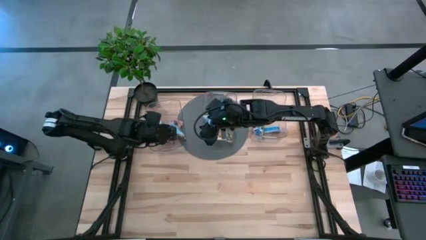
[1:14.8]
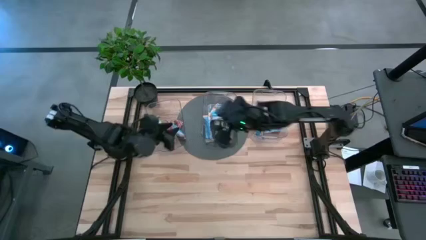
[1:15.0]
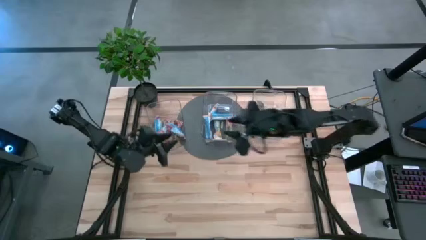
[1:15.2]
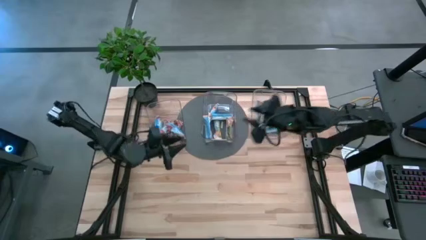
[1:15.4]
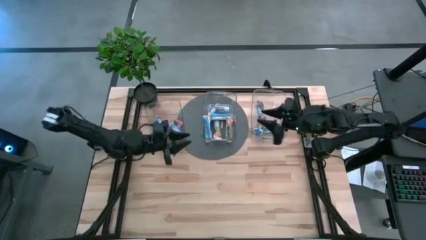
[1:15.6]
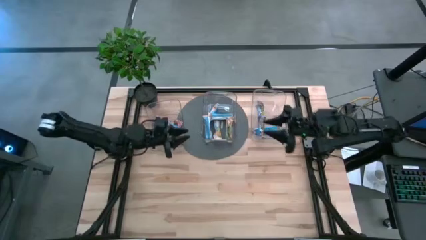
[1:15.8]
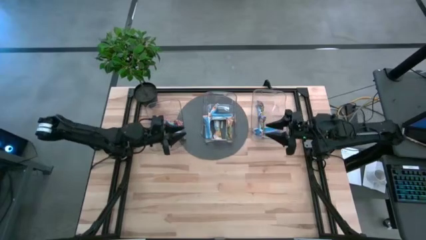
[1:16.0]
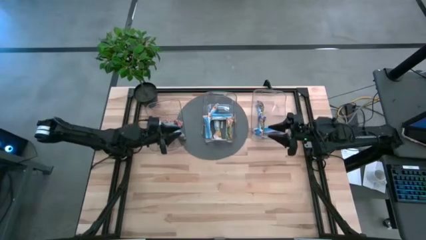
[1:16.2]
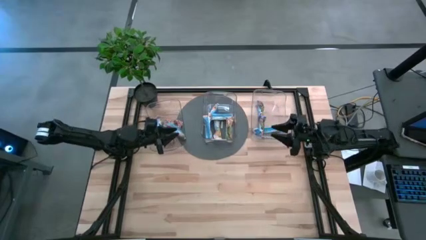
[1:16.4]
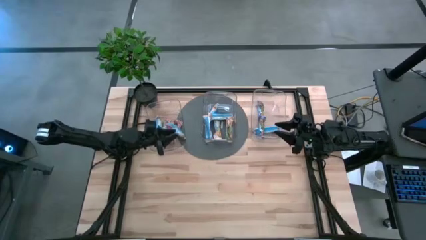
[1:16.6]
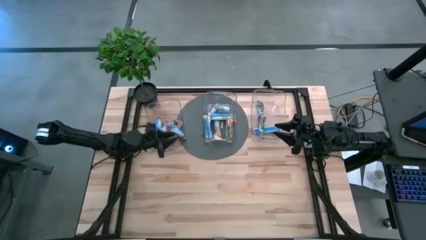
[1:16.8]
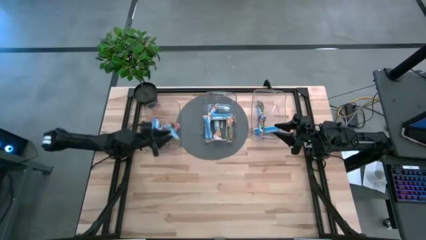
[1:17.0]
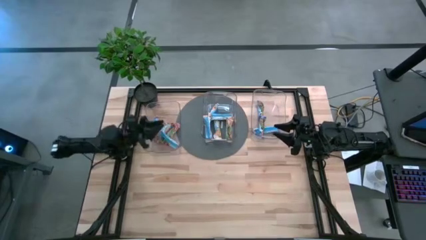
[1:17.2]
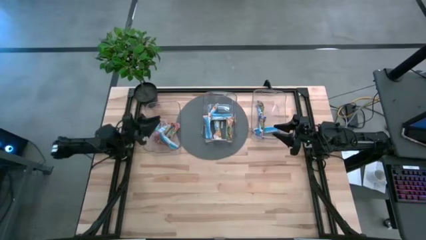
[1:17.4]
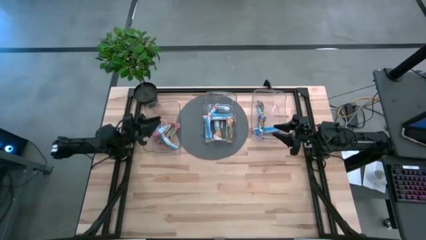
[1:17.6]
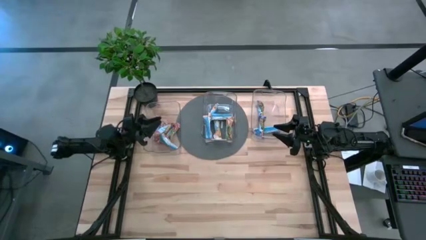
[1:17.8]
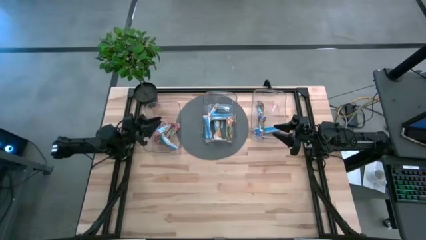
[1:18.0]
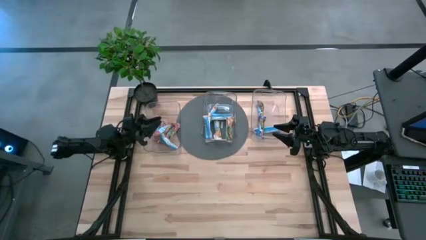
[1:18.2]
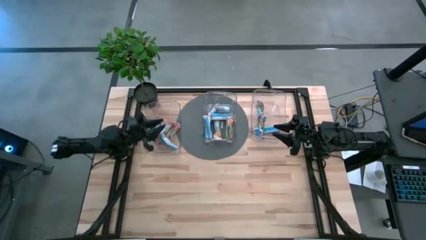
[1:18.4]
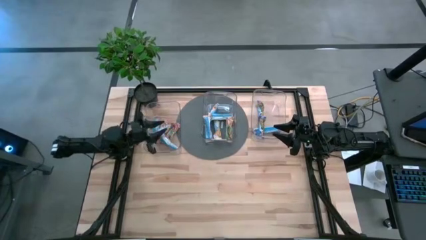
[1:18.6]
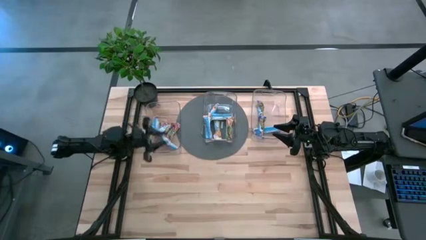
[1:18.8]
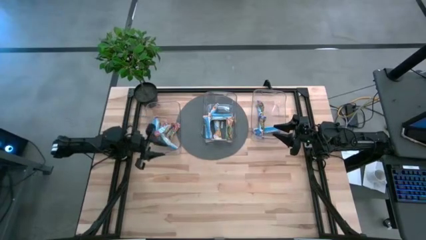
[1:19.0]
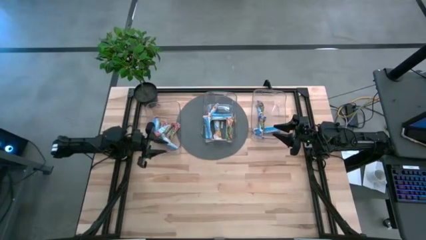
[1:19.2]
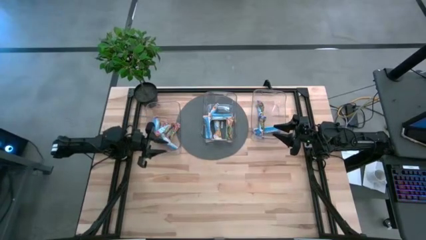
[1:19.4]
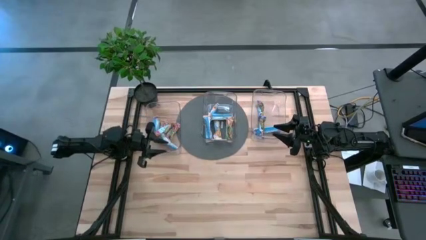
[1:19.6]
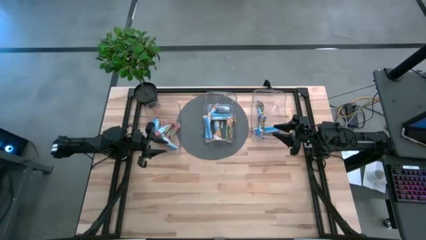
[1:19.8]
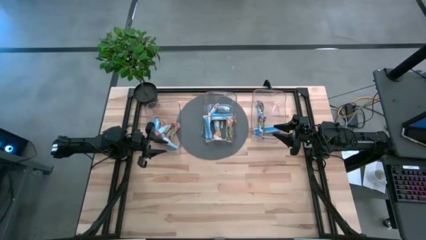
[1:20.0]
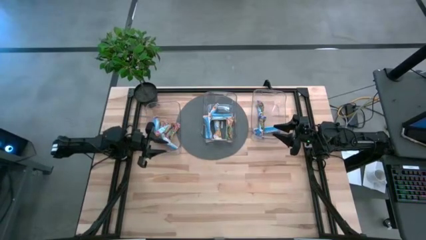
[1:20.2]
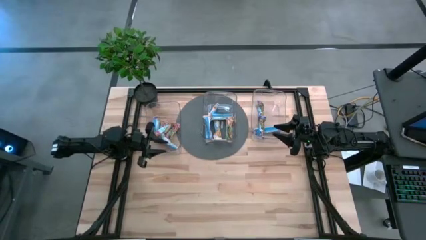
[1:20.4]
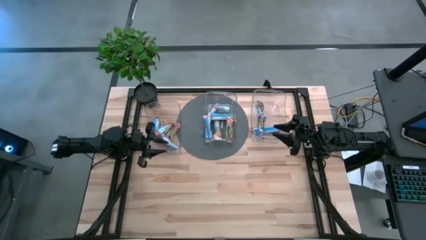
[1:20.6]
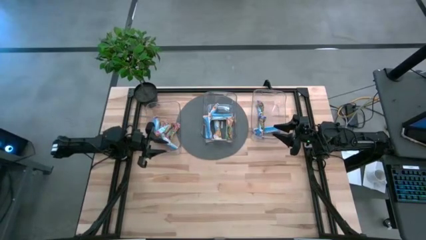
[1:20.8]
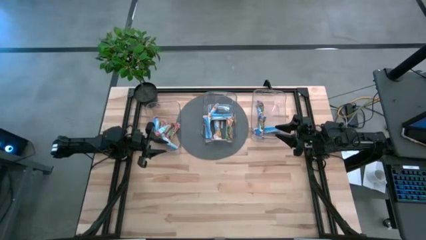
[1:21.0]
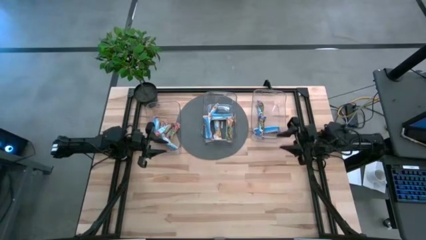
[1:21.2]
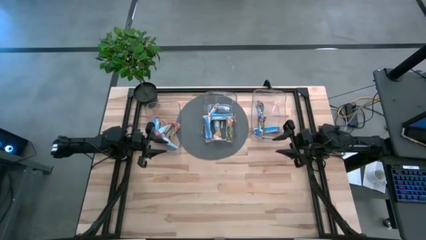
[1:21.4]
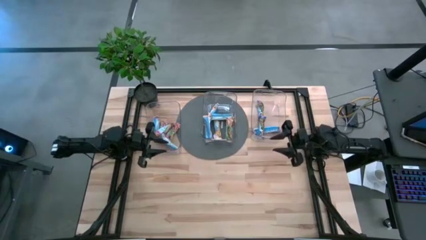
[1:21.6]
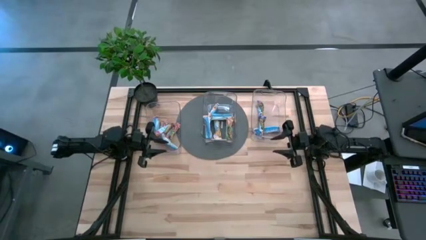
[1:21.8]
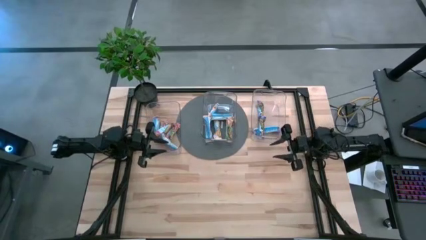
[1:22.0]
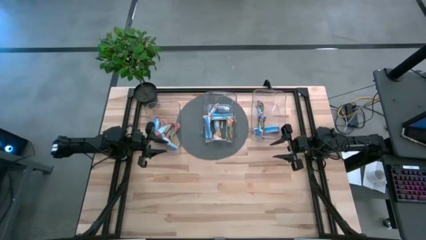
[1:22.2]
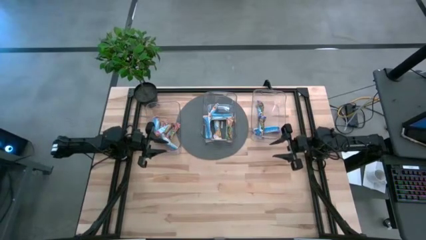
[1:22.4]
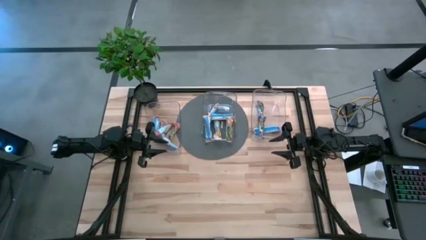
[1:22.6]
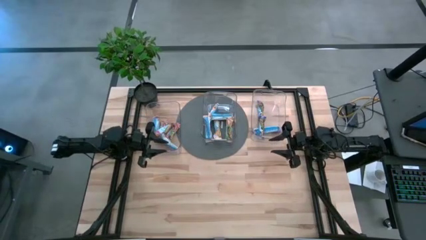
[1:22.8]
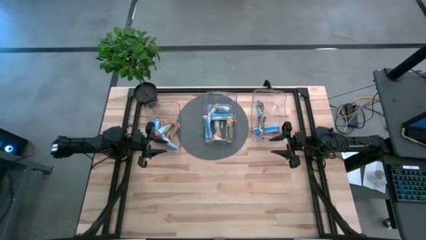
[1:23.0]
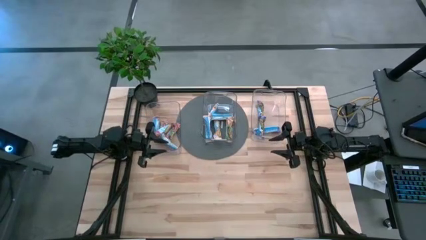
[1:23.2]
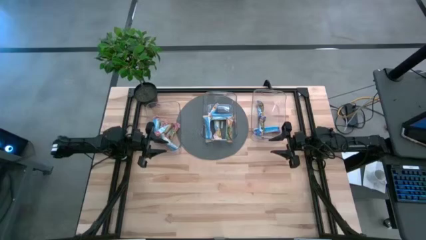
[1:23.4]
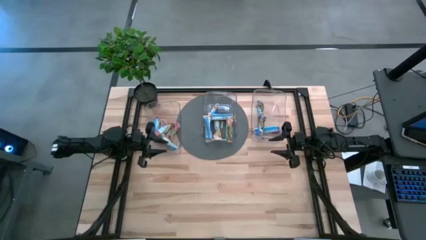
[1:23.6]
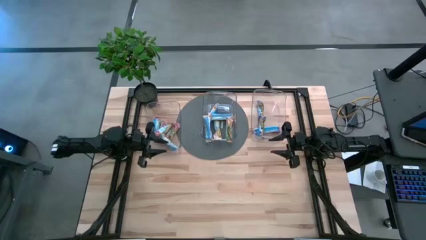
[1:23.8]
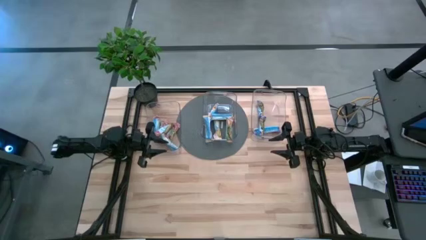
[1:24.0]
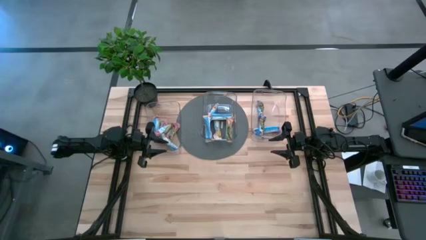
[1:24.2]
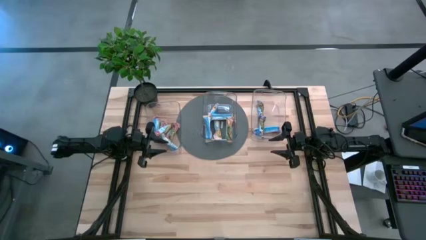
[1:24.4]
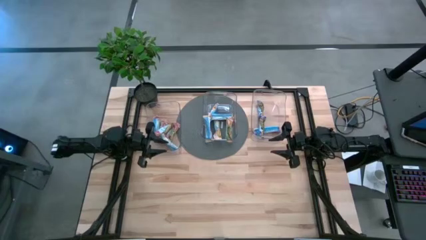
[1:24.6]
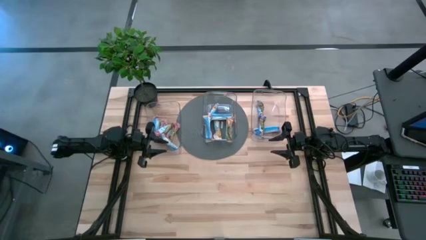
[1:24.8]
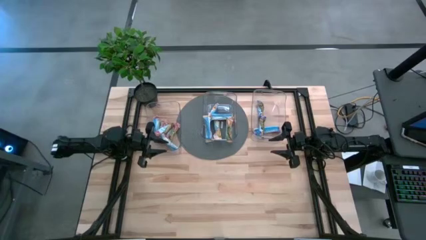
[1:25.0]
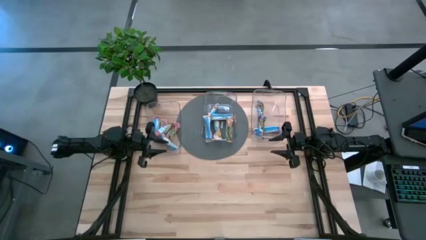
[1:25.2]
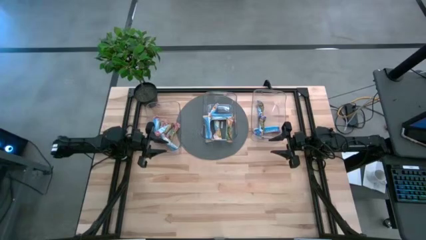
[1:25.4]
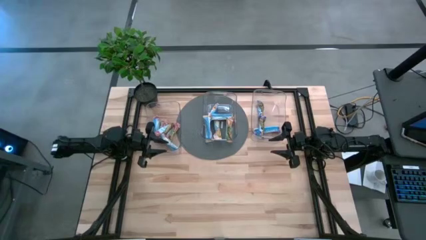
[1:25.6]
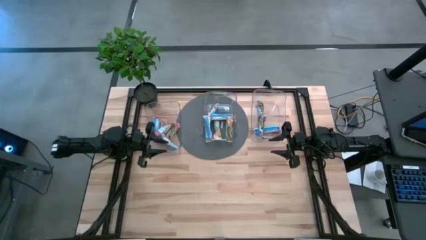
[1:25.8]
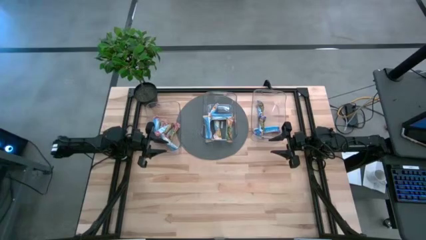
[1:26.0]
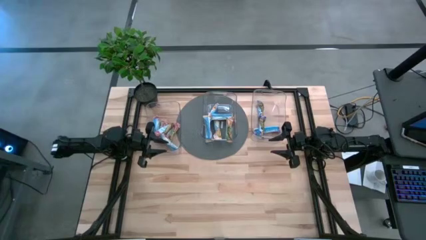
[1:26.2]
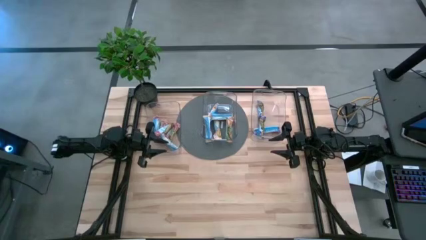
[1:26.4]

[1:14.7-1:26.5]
Task: Pick and place Granola Bars by type
Return to Home Position

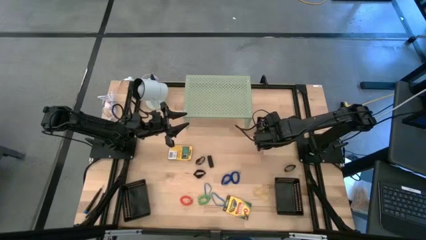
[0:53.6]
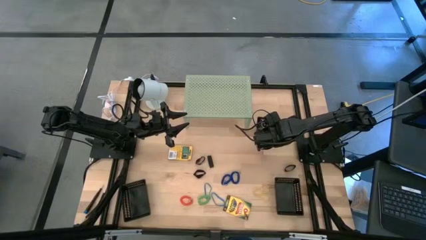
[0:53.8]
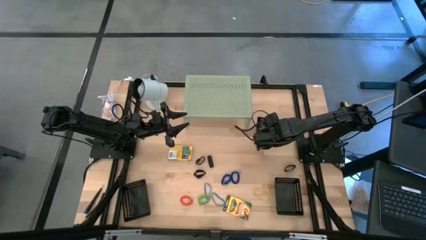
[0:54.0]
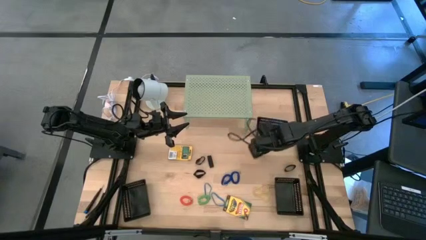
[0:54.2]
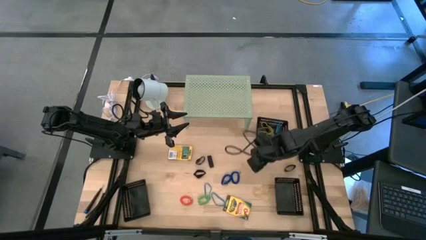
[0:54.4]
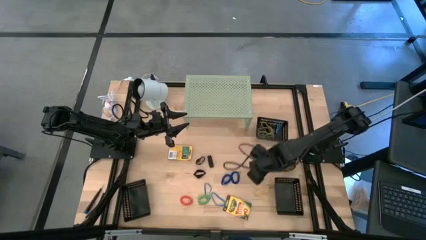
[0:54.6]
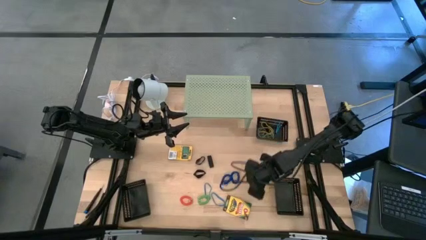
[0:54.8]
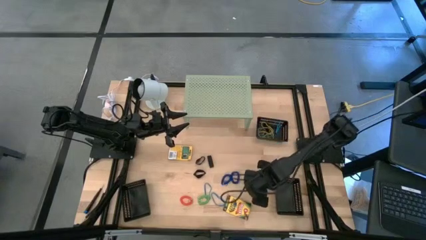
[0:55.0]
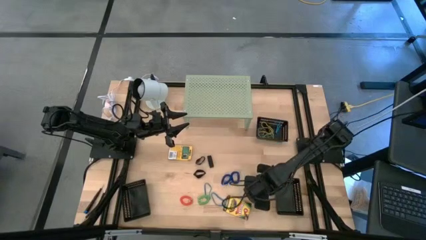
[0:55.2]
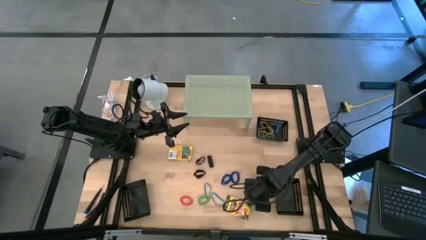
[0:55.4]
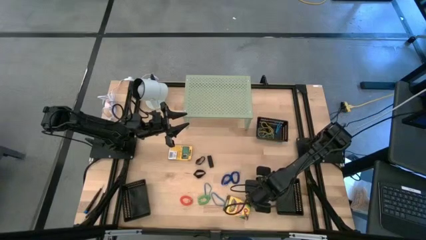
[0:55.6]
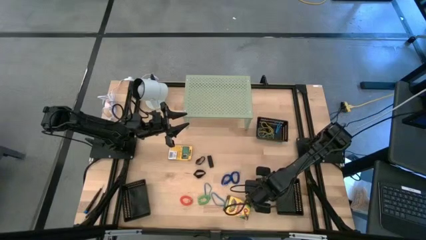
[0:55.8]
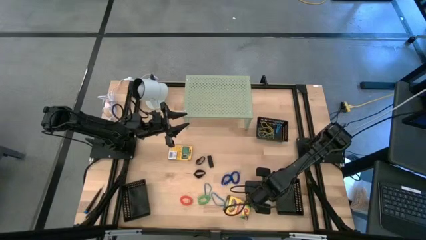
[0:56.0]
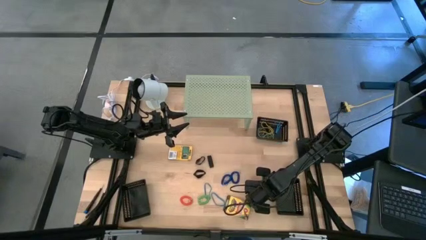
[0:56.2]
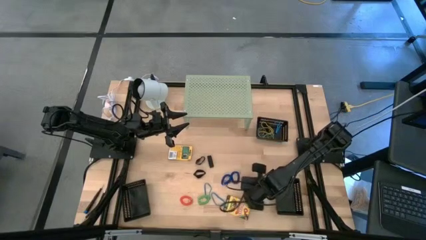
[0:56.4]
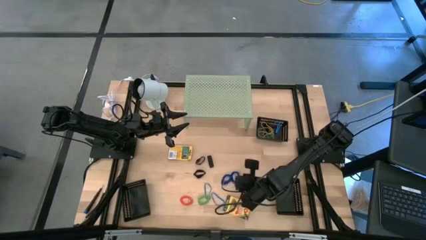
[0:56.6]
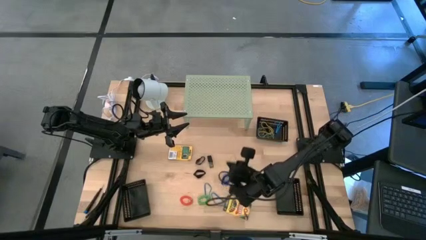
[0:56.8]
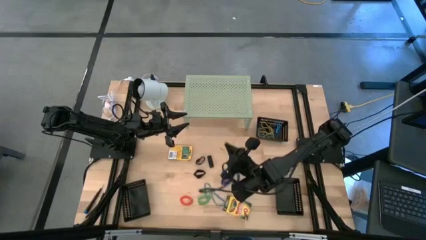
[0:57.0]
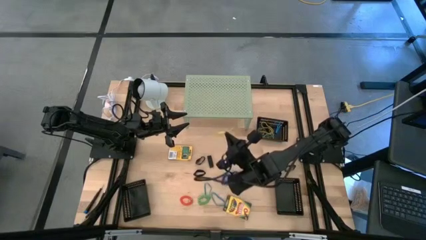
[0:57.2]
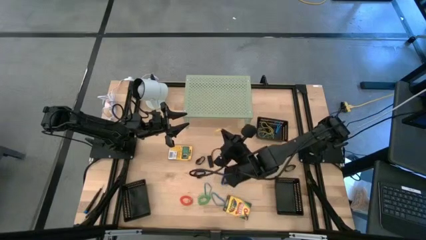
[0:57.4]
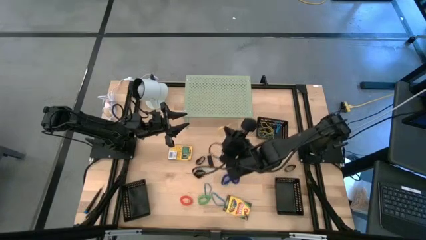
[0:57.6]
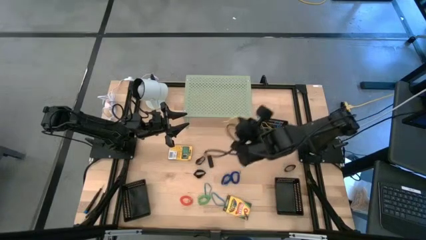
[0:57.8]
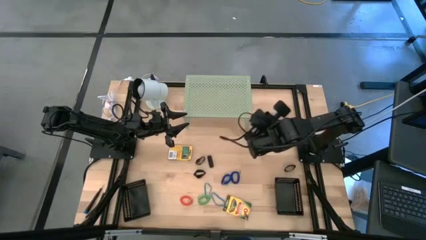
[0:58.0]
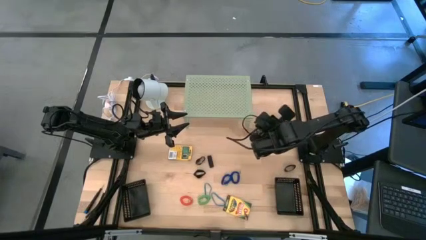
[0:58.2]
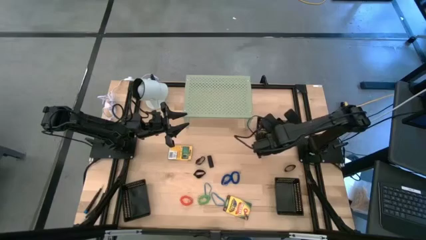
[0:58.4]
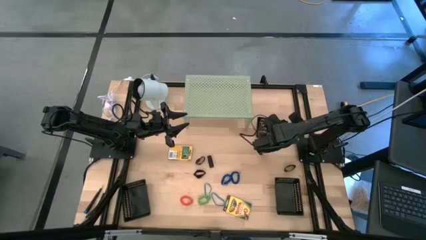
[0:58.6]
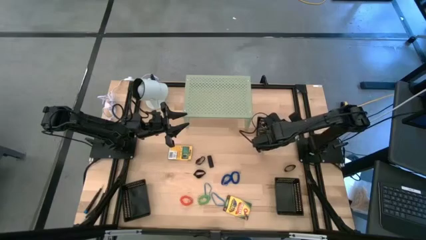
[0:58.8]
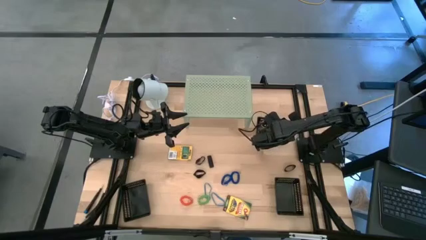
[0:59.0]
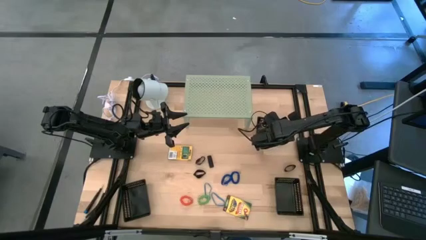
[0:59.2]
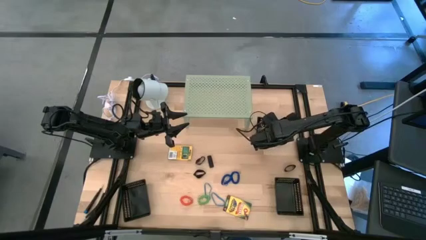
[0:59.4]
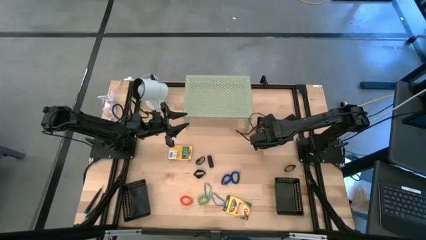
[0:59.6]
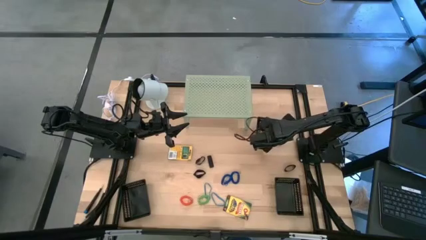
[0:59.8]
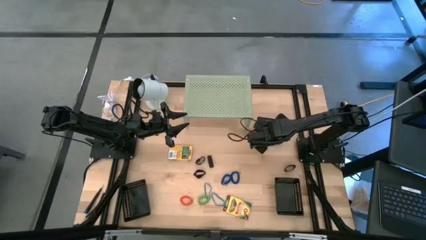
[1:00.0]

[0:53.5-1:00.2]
Task: Pick & Place Office Desk Supplies
Put the yellow rubber band into the top right black bin
